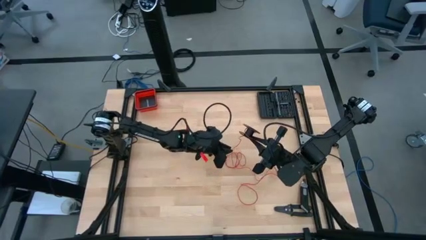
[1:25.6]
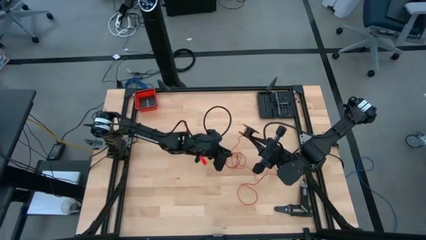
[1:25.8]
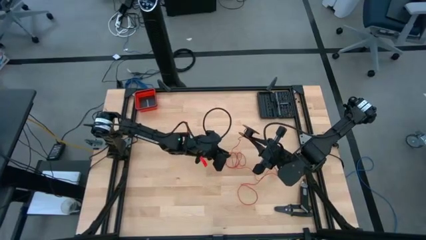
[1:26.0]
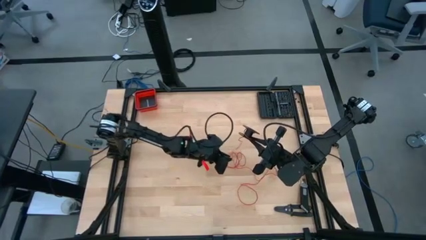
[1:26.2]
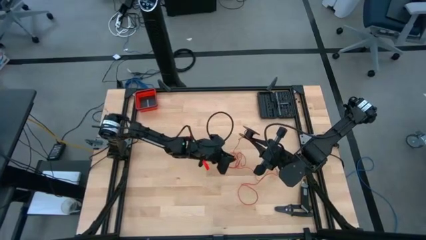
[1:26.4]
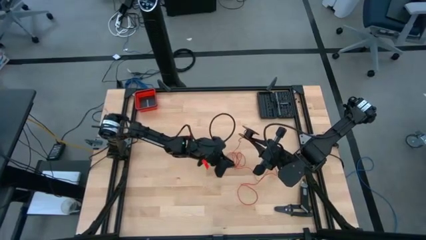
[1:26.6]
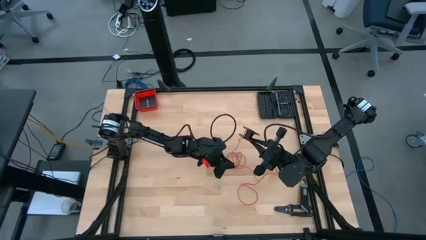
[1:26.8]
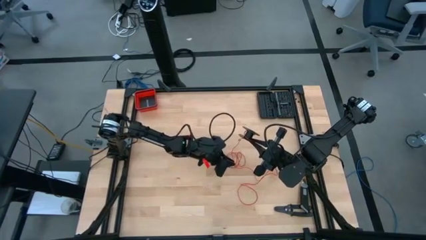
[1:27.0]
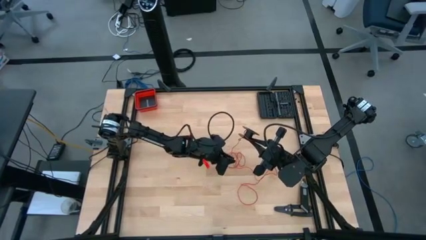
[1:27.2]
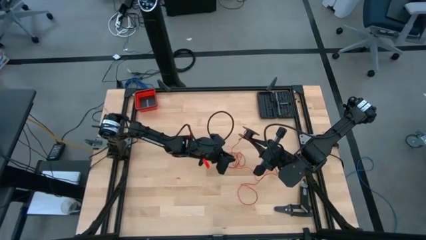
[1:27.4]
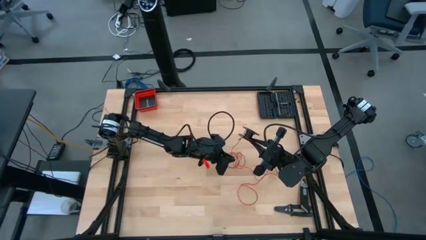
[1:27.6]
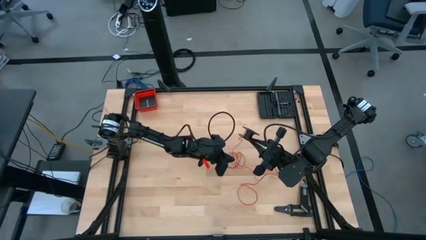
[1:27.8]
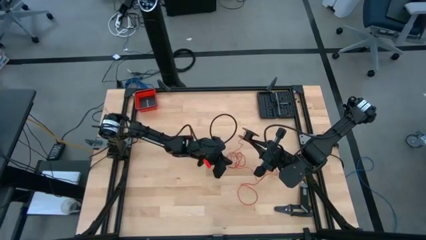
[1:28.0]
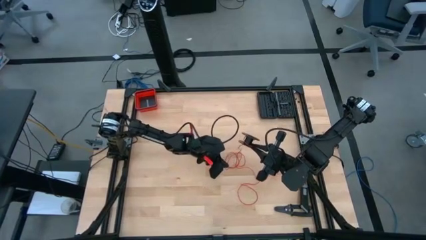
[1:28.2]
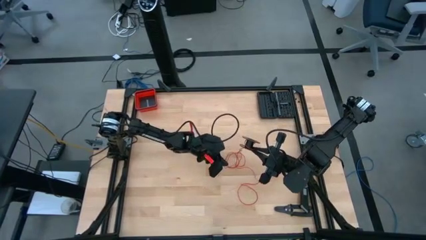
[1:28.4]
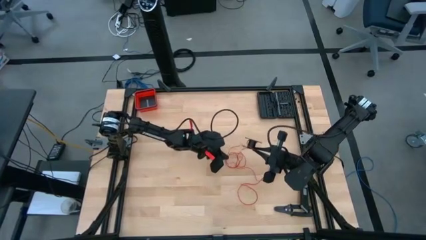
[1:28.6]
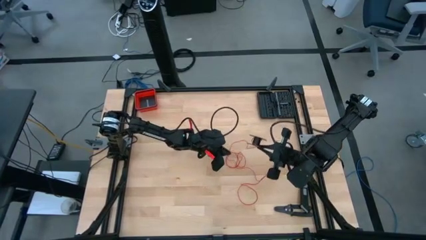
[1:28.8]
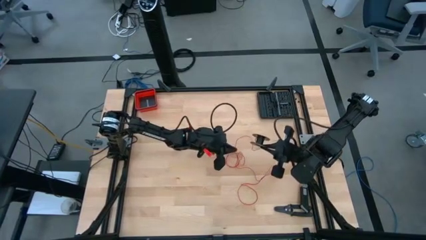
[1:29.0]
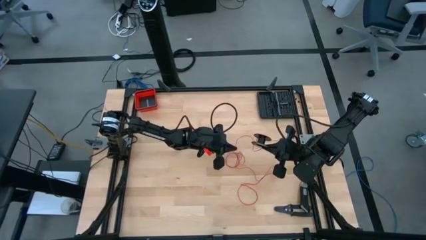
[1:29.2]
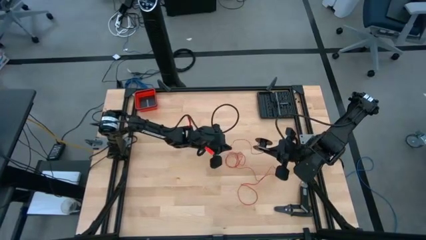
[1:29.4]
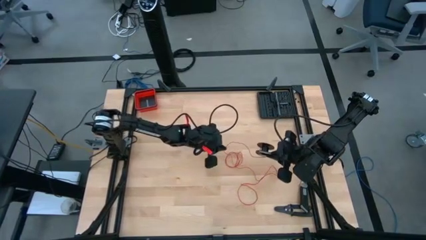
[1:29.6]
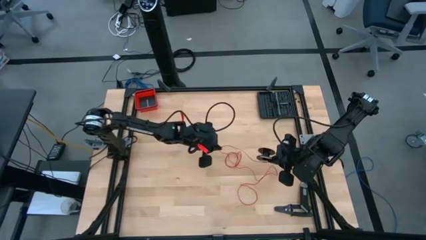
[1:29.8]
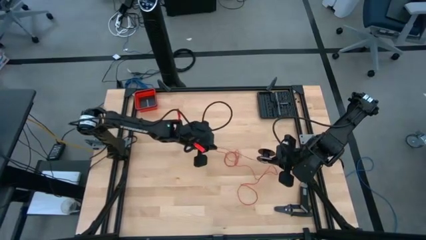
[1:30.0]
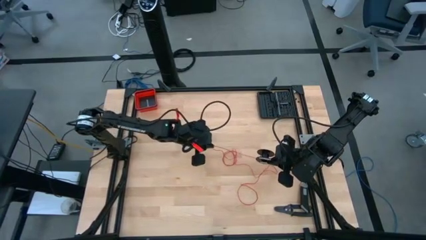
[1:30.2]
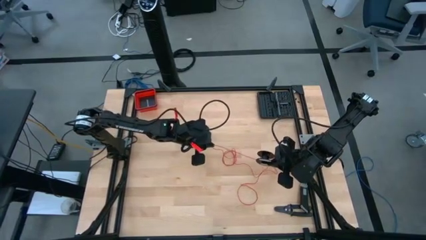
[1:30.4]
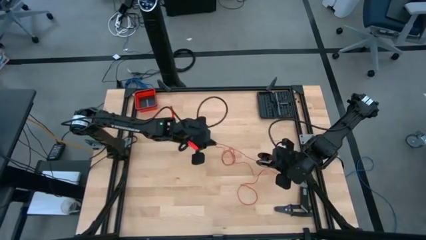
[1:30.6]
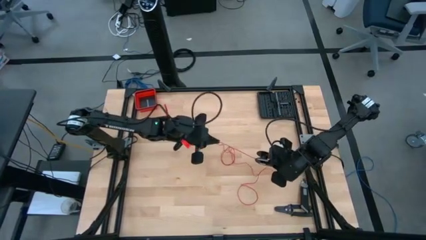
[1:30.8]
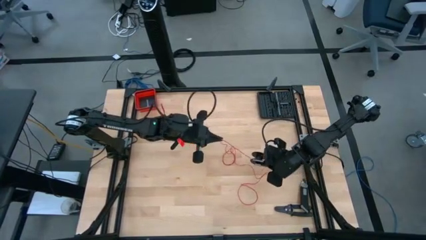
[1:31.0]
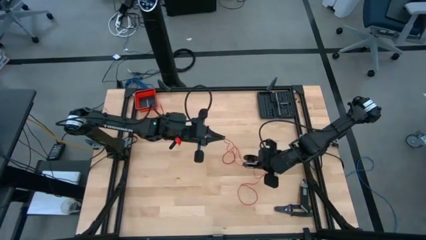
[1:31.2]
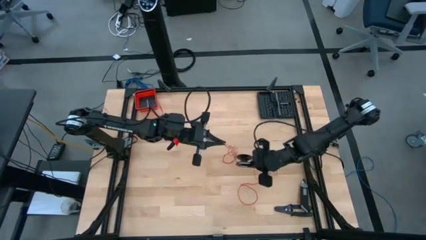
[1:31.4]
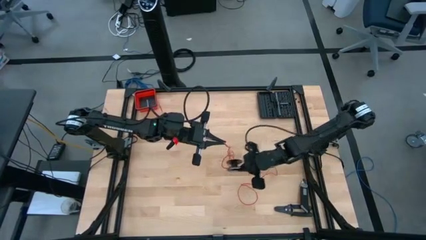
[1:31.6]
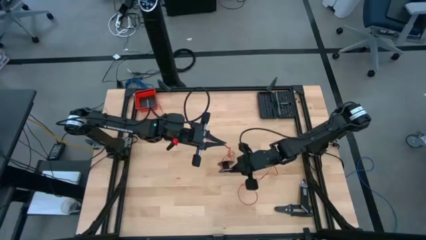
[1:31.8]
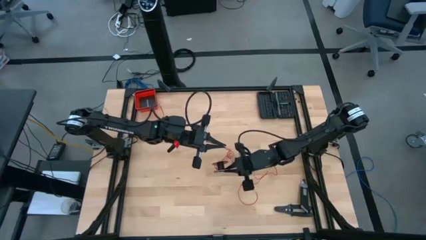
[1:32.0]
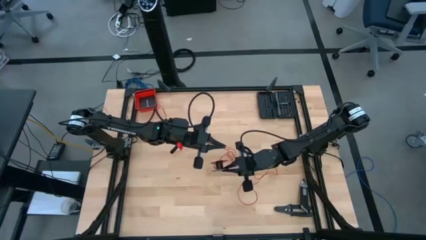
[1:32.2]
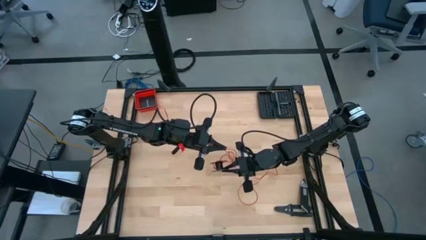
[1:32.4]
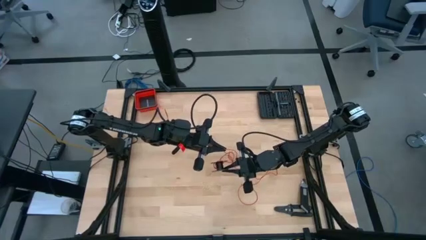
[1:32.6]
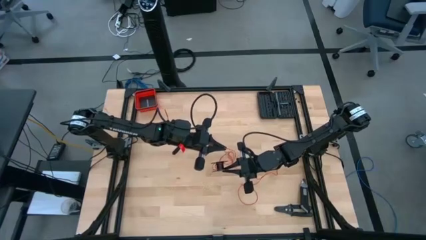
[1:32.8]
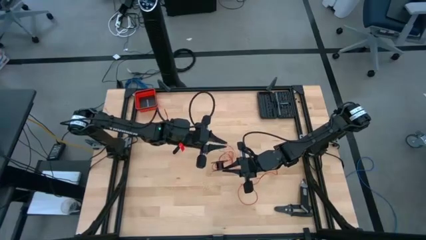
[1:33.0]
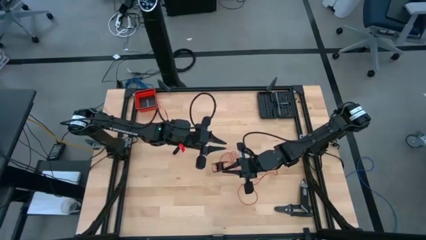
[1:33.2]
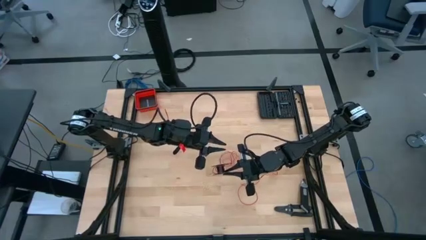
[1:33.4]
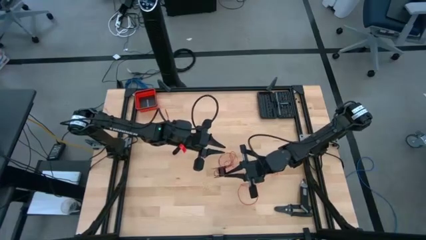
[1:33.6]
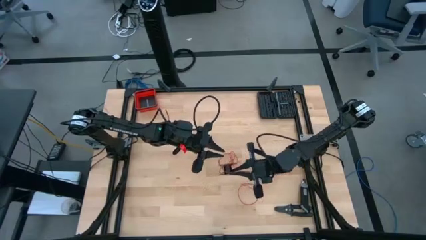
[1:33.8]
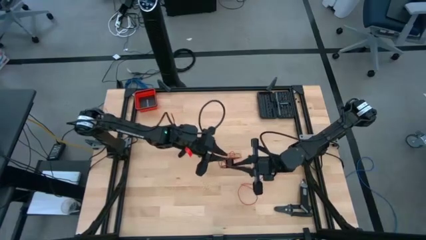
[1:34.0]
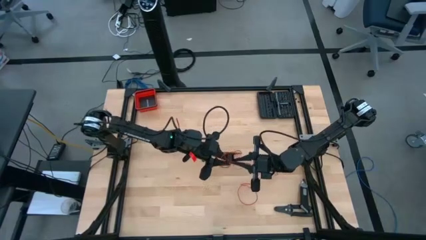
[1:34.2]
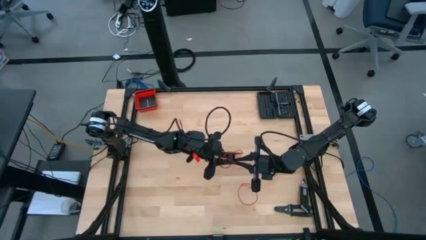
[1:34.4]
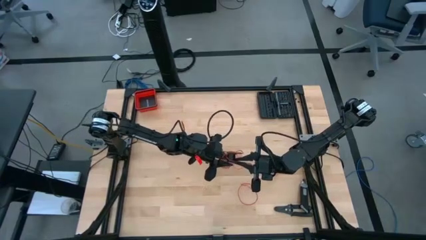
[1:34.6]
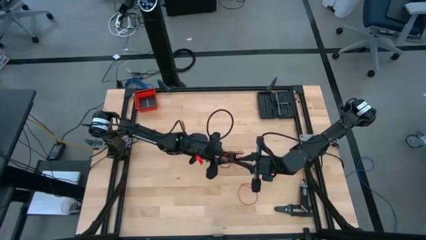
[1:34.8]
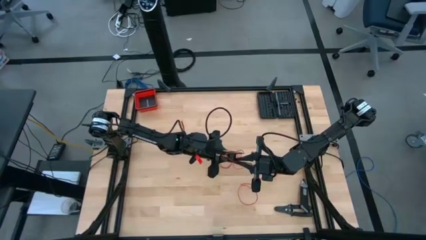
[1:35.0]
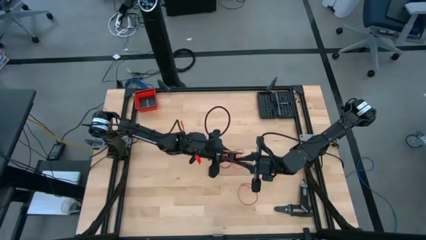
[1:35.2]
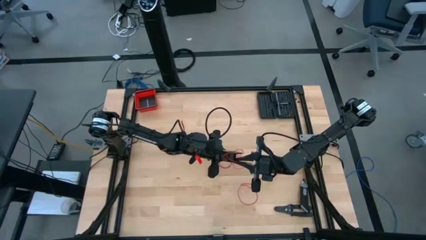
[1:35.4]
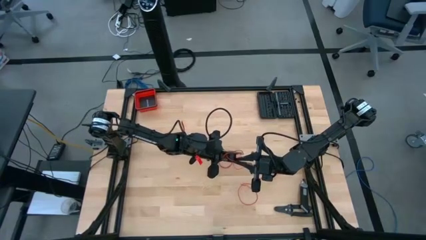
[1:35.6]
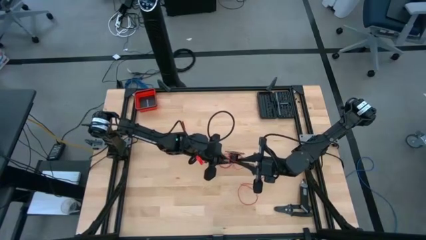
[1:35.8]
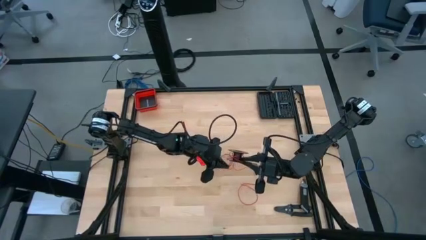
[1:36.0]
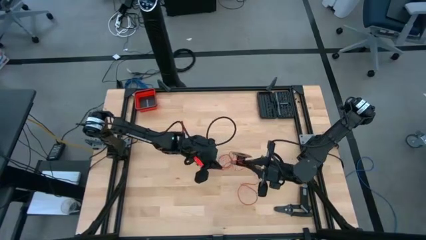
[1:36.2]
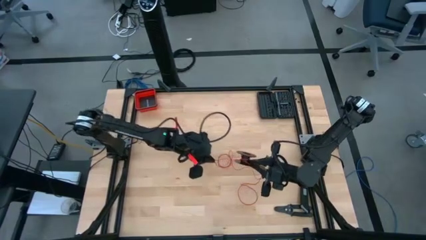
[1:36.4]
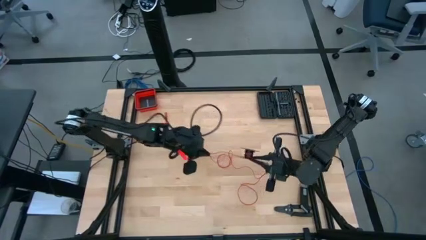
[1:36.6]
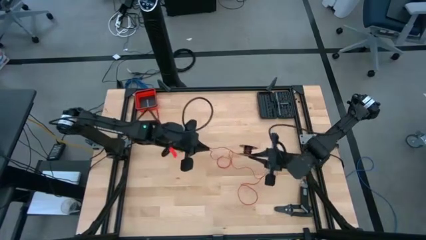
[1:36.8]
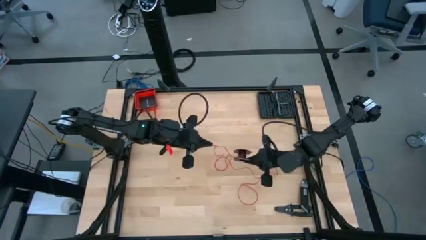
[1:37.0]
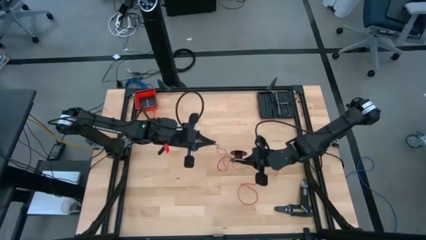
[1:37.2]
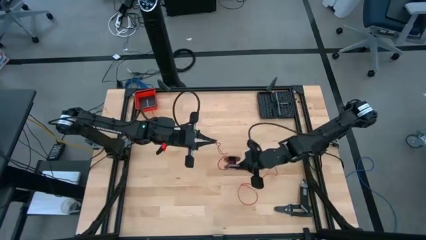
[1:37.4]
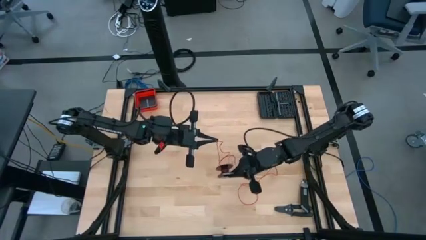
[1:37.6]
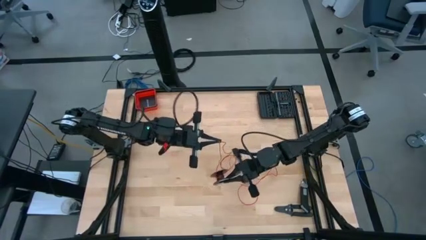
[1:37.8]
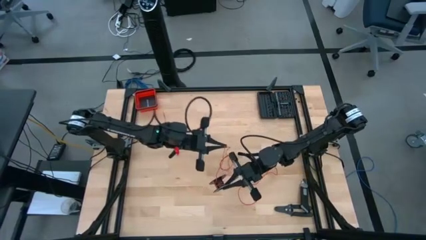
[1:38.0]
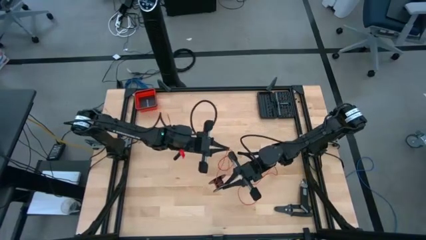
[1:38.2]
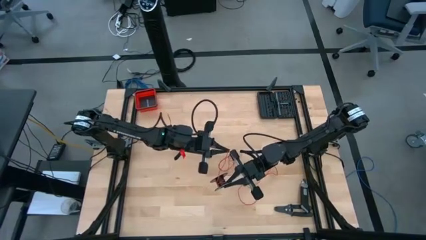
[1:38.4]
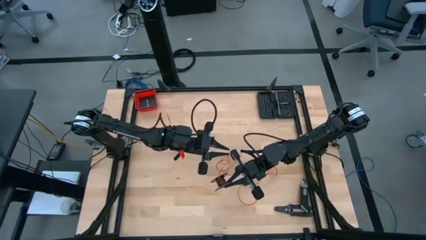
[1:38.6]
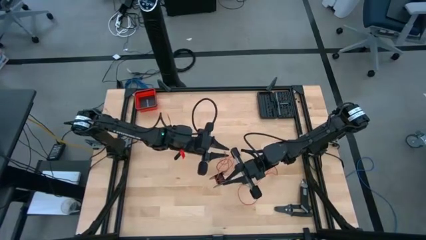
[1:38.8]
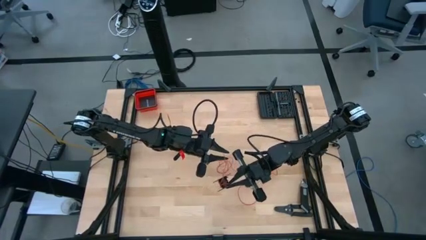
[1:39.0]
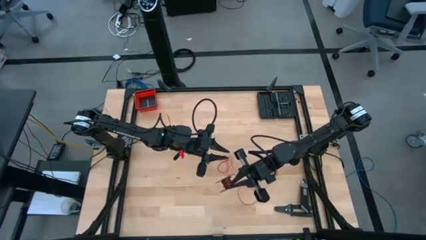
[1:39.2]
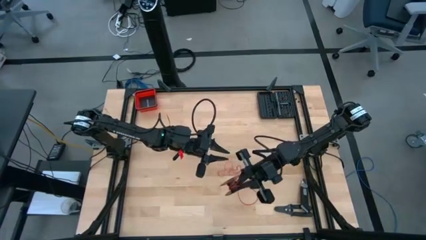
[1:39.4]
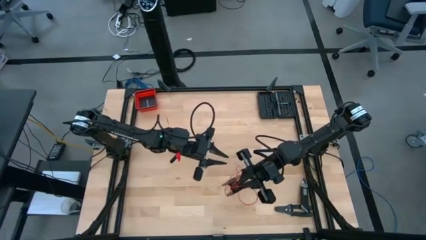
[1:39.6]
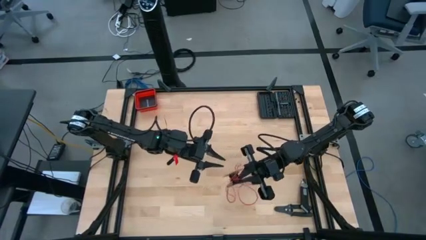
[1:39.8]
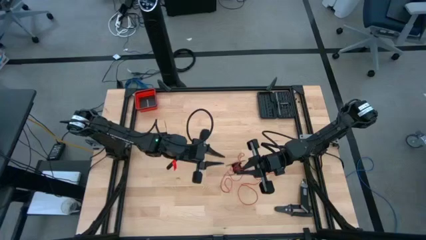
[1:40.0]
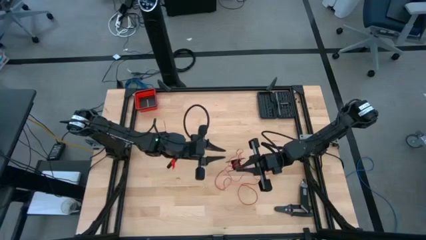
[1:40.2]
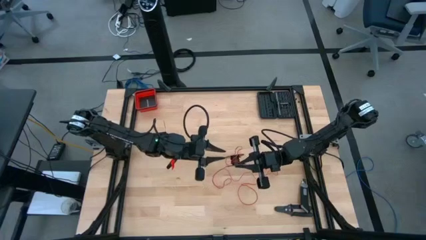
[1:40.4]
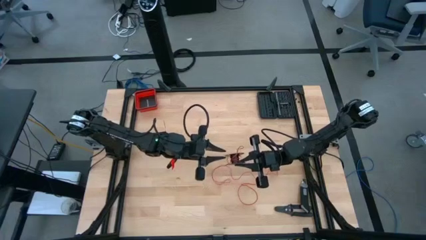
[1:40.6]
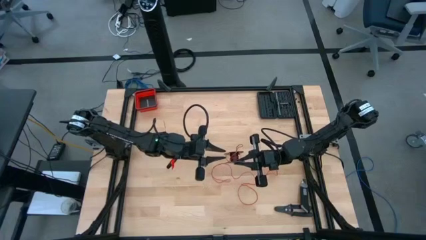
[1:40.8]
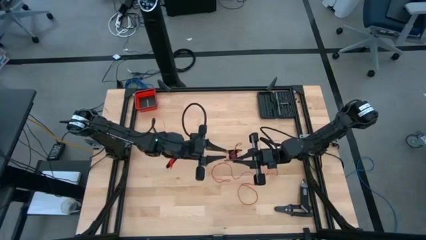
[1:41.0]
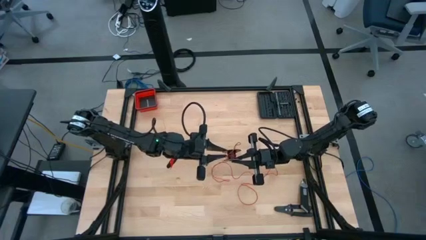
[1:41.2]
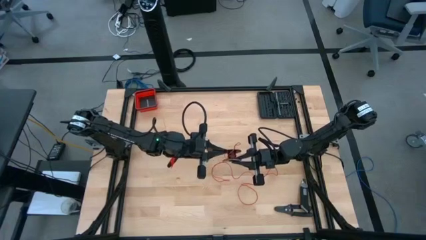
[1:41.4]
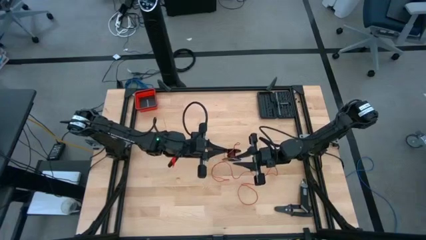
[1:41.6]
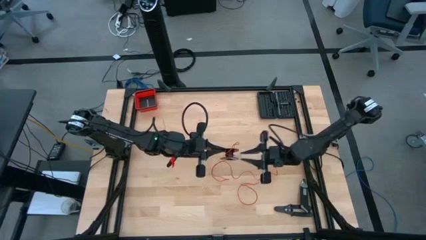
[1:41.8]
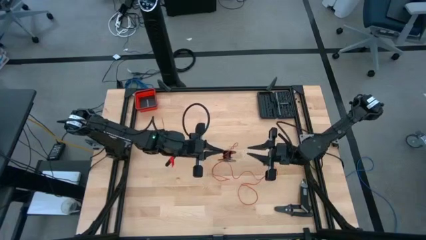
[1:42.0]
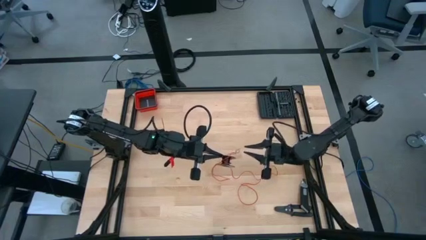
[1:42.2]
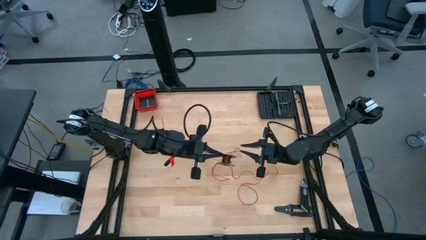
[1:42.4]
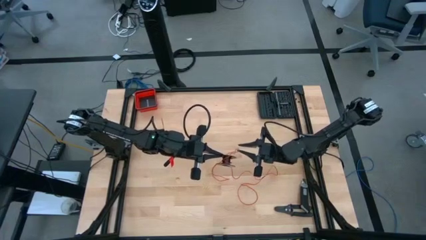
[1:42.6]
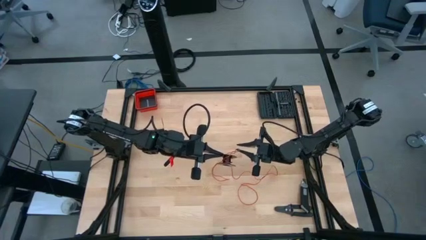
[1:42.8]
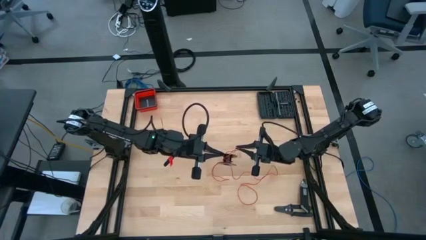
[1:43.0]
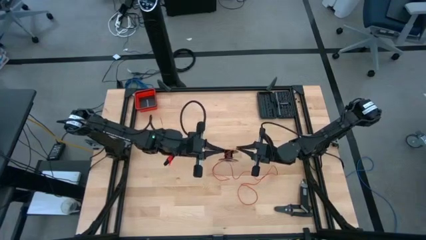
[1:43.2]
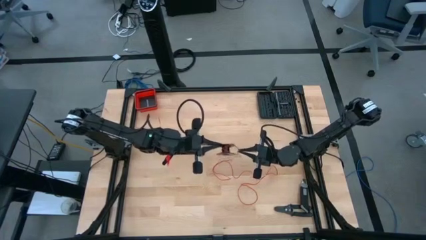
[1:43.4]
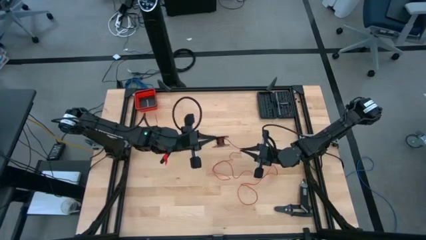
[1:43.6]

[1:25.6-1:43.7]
Task: Coil cords
Coil the red wire onto the spool
